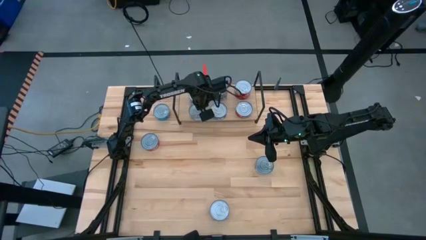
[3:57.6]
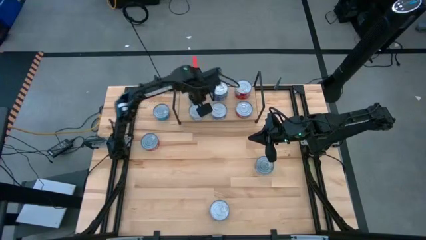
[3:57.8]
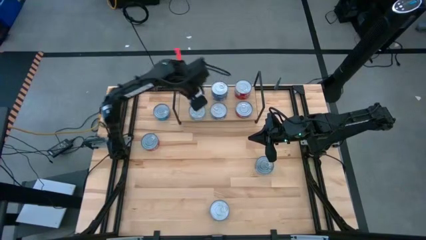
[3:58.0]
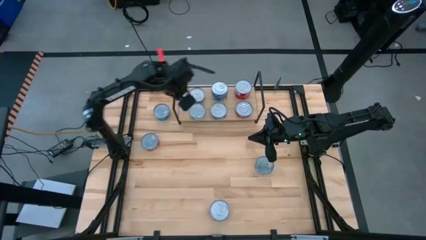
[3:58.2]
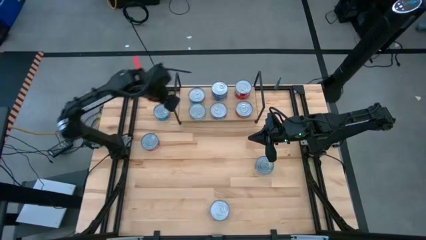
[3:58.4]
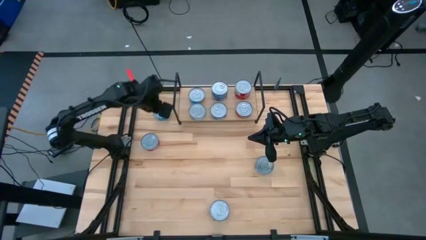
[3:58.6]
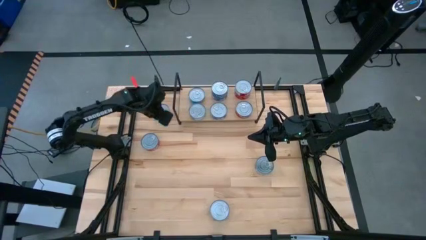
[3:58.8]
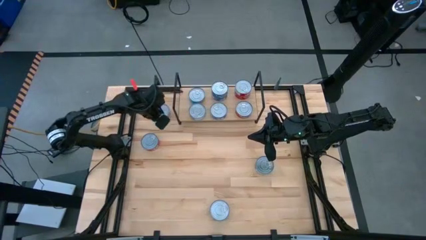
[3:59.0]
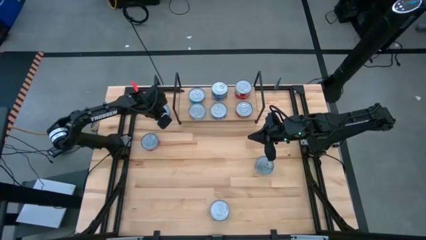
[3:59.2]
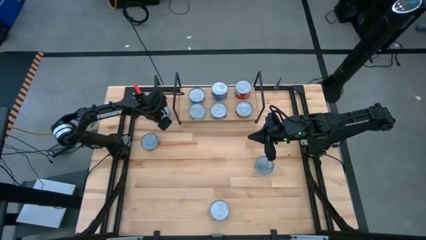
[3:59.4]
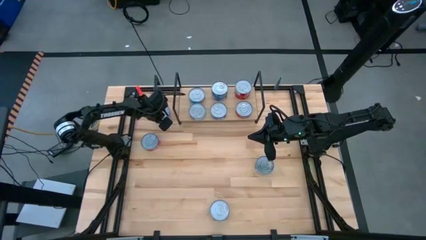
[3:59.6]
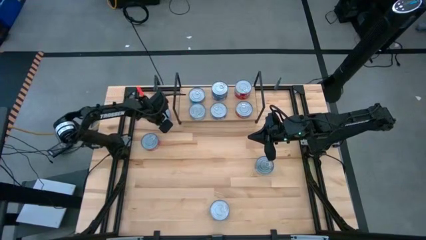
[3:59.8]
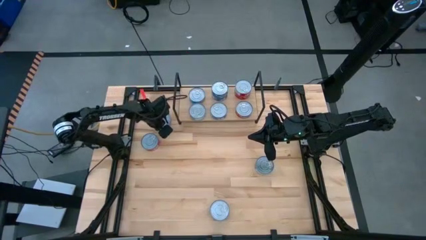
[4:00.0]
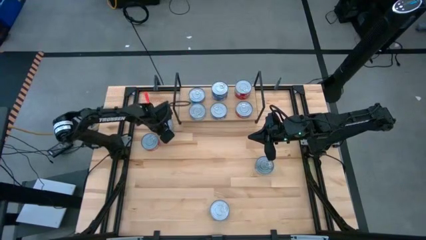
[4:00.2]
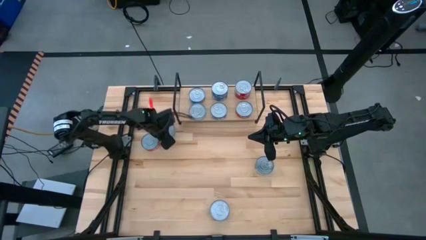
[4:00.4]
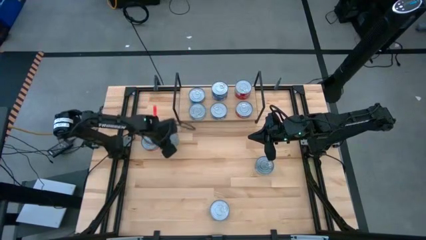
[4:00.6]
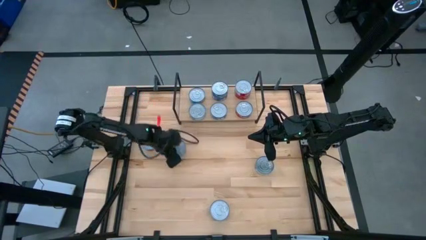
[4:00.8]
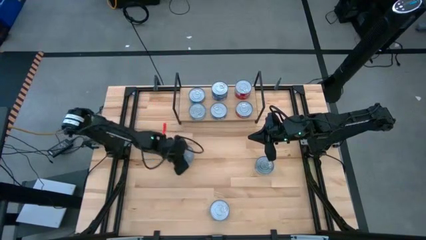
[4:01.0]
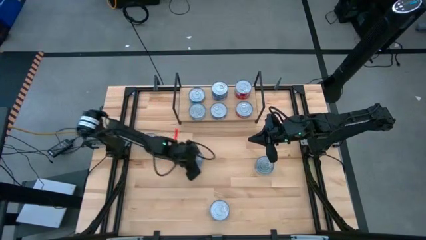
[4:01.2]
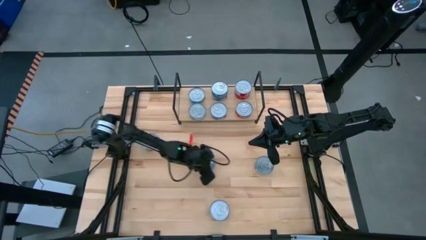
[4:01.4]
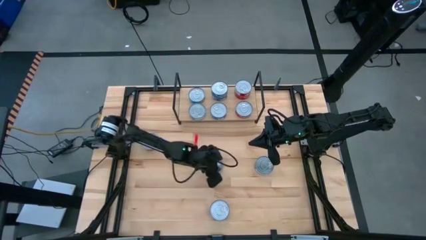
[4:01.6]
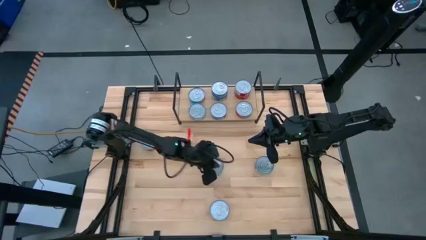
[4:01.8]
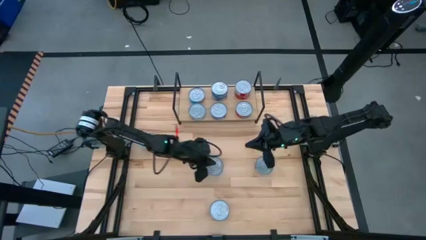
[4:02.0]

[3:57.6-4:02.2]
Task: Stack canned seafood by type on shelf
Move the top left light blue tuna can to the center of the table

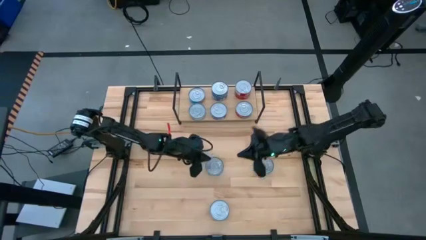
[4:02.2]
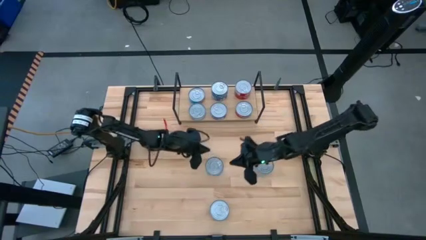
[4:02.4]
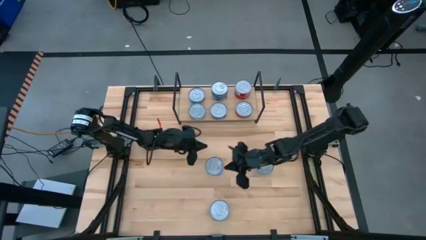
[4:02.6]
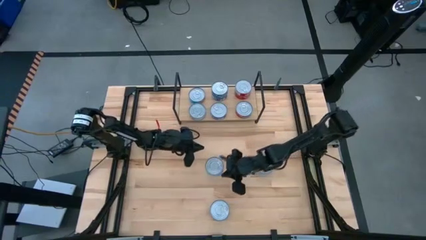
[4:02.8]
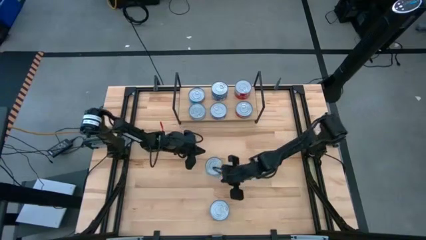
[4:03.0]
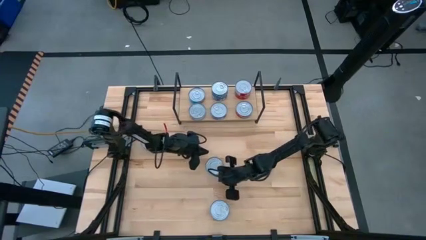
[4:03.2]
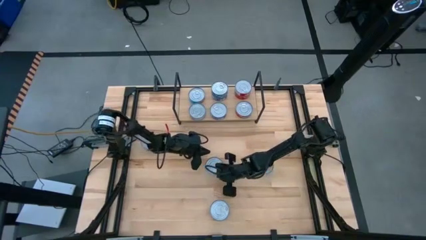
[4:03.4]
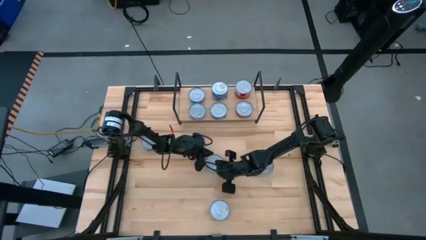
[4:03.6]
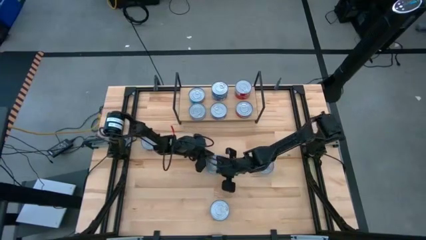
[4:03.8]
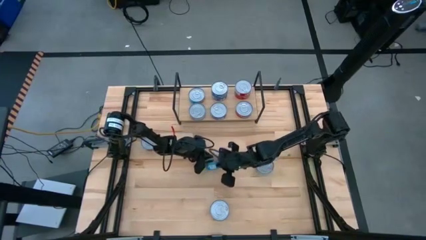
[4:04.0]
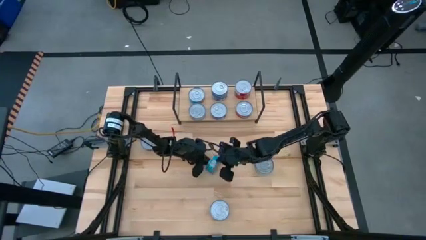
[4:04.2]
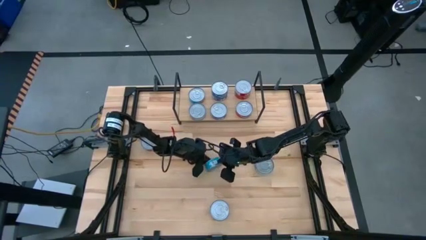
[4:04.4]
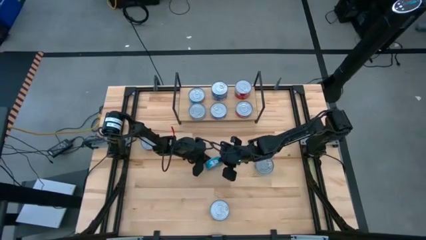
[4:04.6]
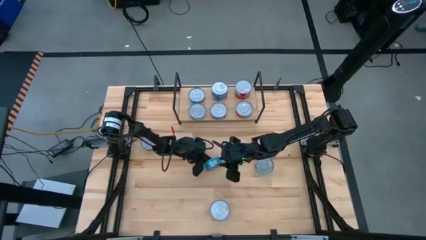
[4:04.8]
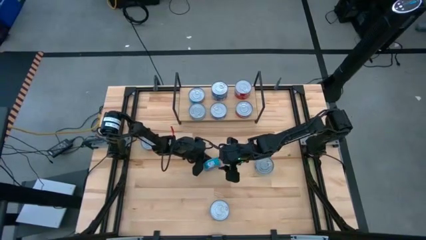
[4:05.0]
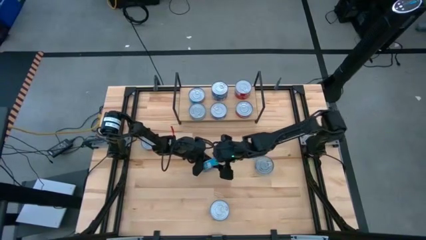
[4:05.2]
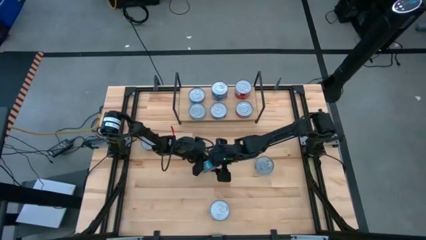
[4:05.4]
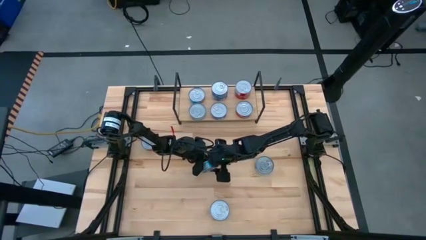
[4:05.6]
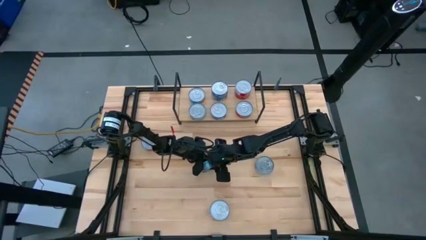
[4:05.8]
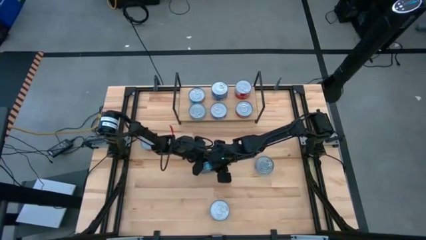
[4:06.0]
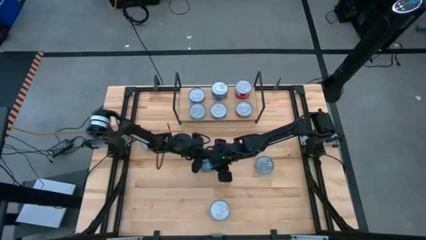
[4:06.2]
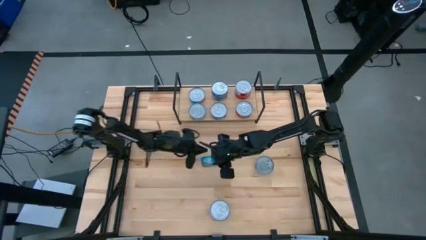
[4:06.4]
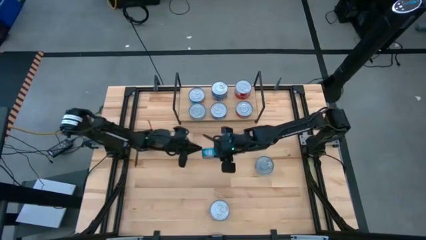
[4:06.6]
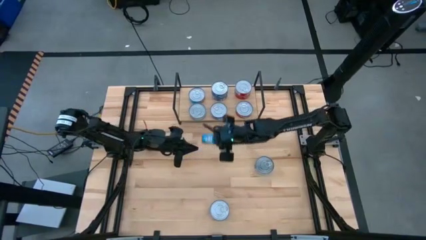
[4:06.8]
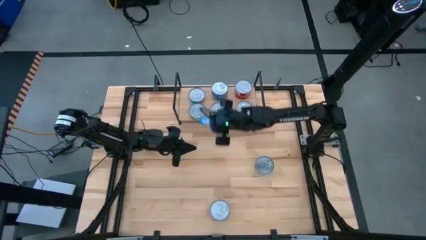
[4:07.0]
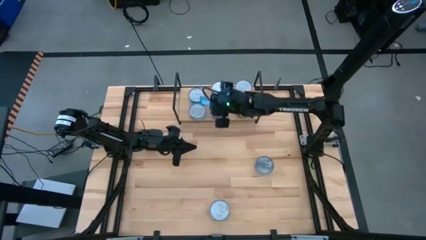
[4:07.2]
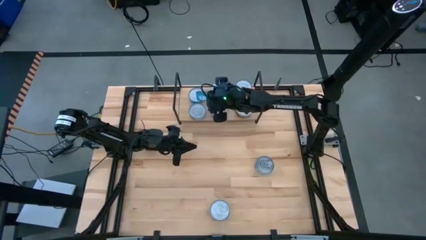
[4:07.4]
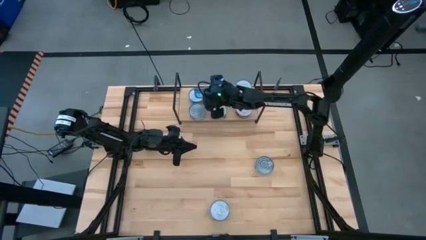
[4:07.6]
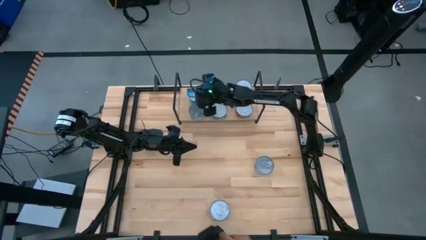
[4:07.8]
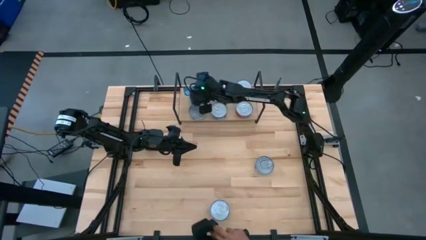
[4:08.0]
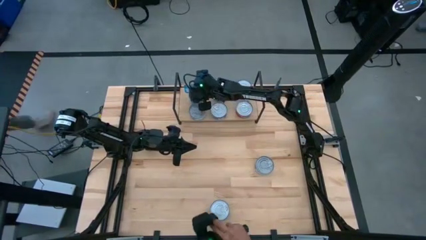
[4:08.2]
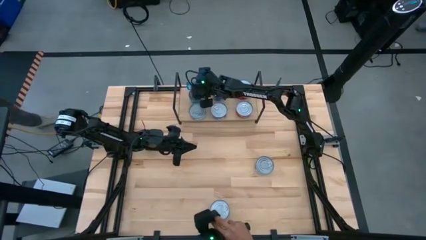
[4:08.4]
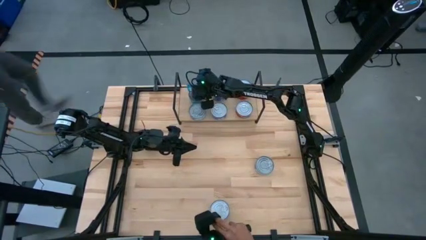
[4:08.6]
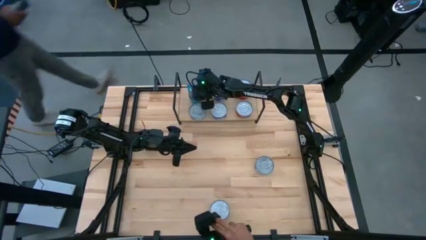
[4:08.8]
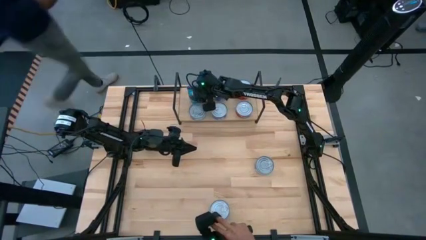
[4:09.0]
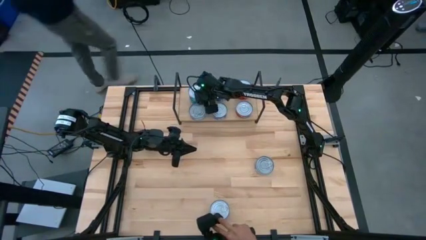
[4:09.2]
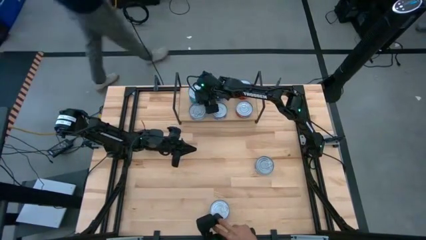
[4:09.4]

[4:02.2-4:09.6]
Stack the center light blue tuna can on top of the other light blue tuna can on the shelf

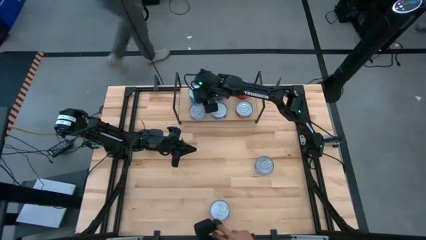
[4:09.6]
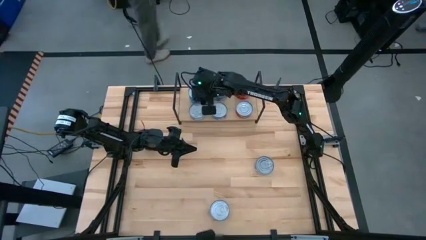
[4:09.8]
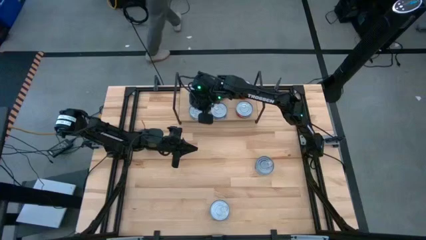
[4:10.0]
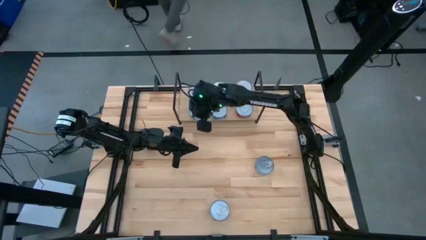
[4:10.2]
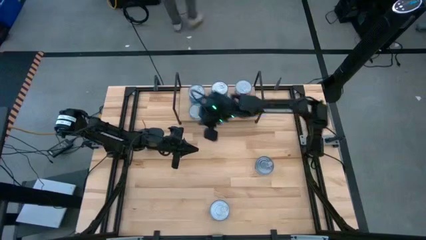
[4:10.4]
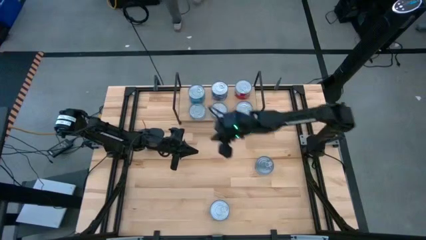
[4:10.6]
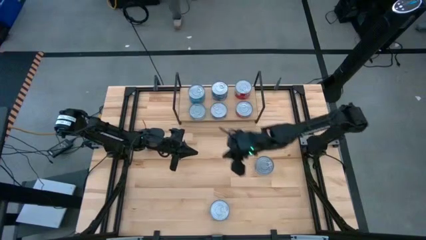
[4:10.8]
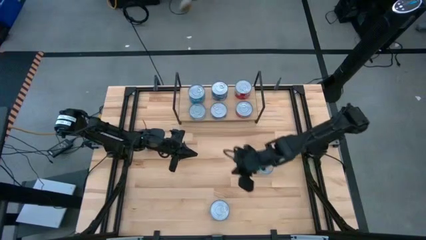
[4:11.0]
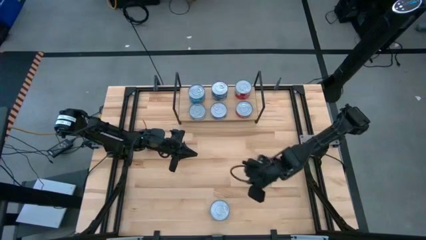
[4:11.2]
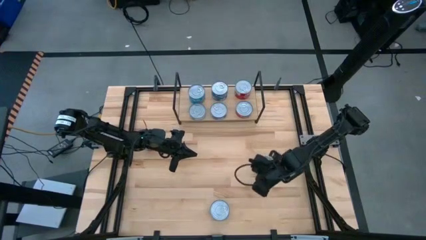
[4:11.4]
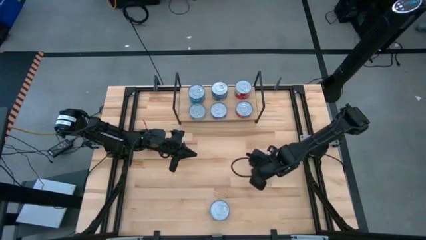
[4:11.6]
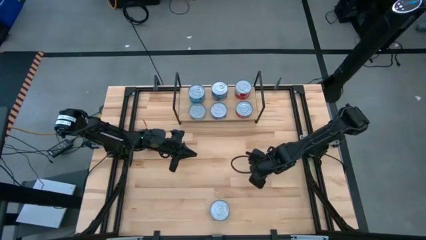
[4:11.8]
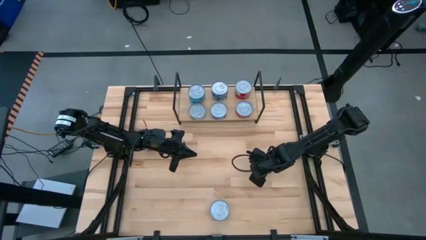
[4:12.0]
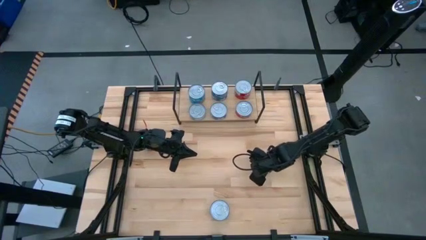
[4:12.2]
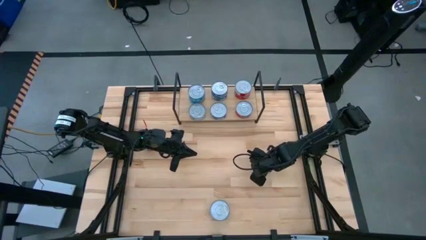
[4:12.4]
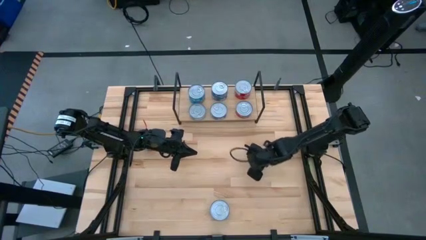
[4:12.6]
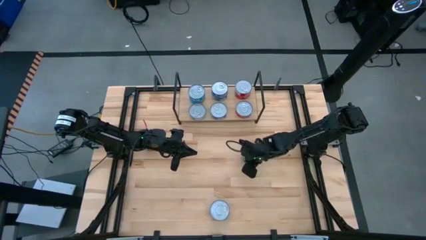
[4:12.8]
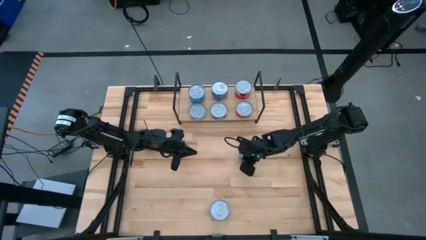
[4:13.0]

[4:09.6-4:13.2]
Stack the middle right blue tuna can on top of the other blue tuna can on the shelf
